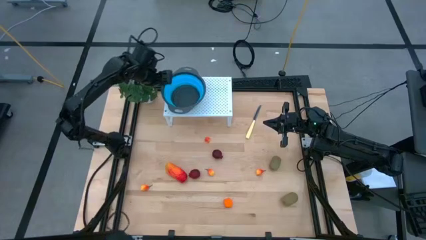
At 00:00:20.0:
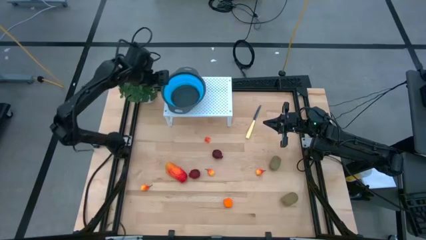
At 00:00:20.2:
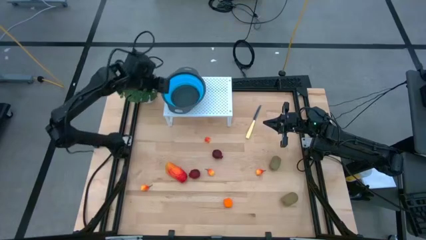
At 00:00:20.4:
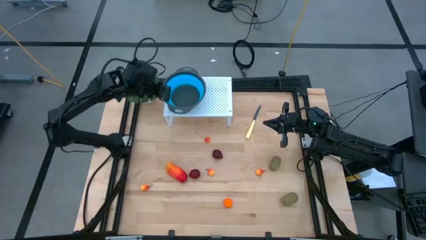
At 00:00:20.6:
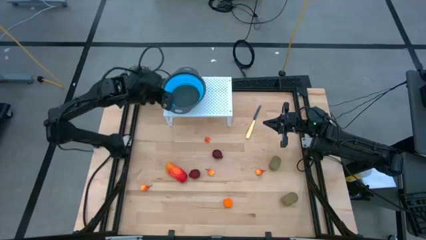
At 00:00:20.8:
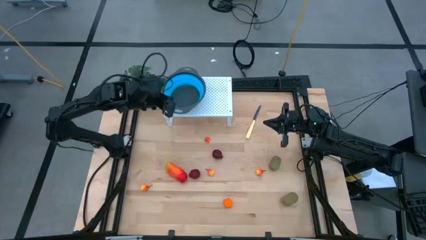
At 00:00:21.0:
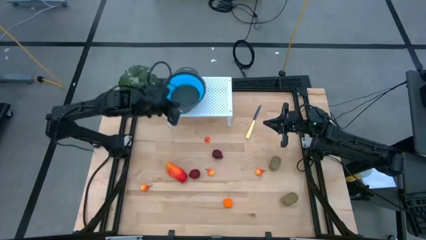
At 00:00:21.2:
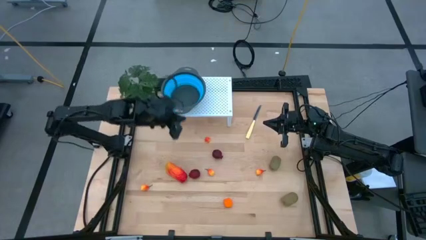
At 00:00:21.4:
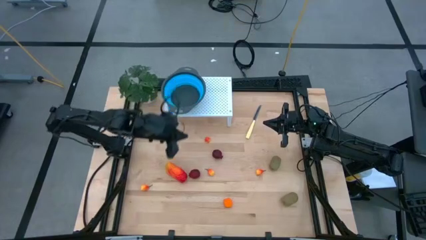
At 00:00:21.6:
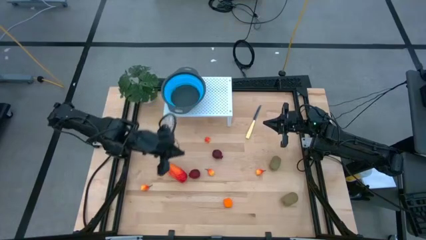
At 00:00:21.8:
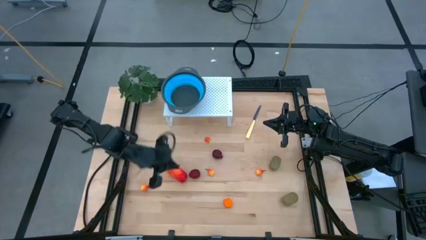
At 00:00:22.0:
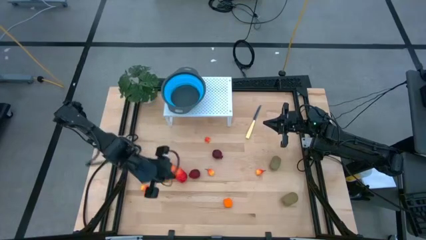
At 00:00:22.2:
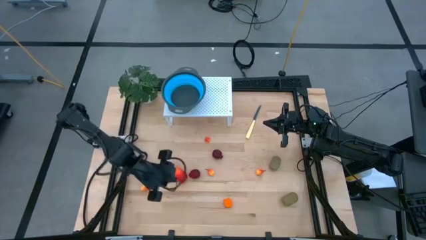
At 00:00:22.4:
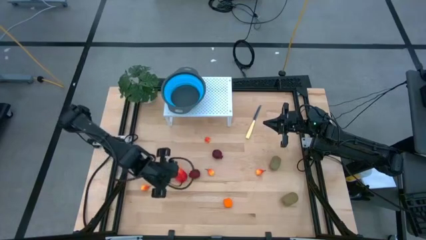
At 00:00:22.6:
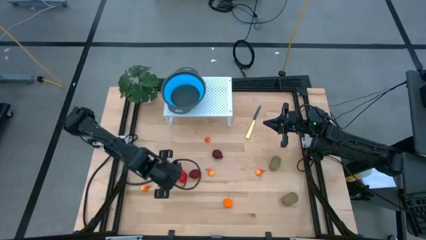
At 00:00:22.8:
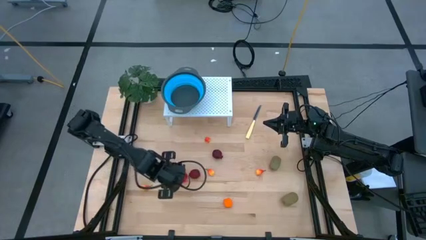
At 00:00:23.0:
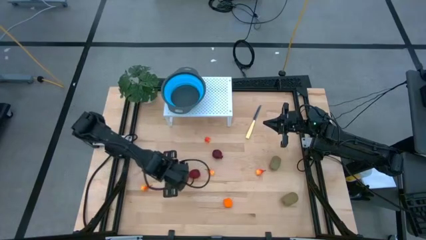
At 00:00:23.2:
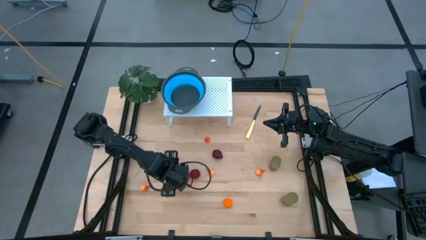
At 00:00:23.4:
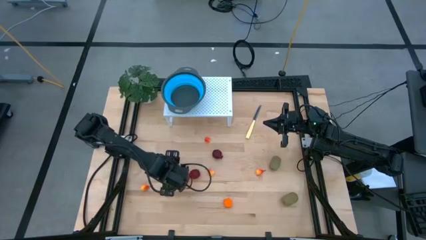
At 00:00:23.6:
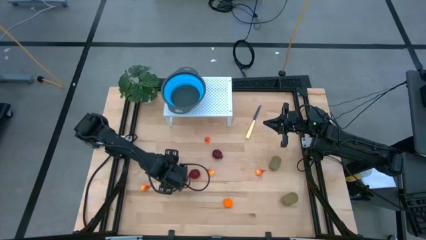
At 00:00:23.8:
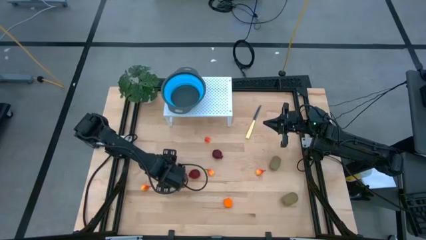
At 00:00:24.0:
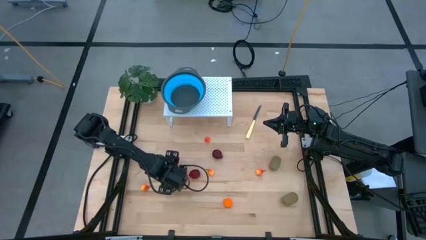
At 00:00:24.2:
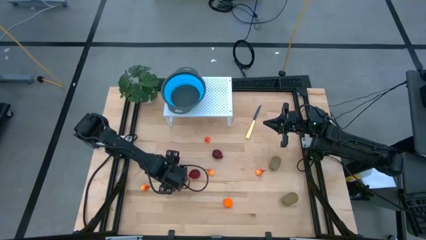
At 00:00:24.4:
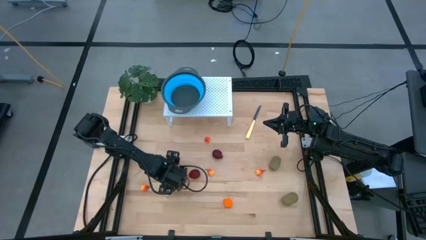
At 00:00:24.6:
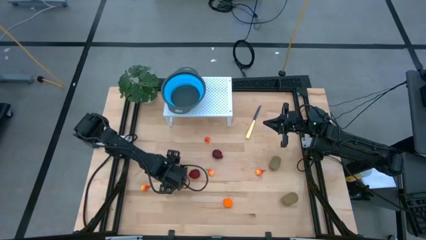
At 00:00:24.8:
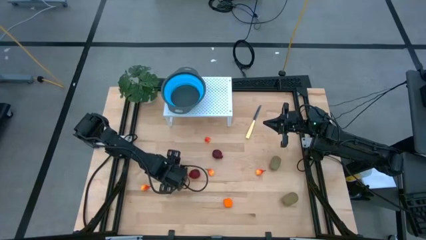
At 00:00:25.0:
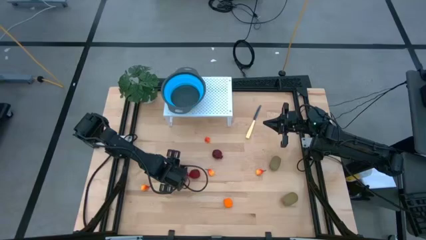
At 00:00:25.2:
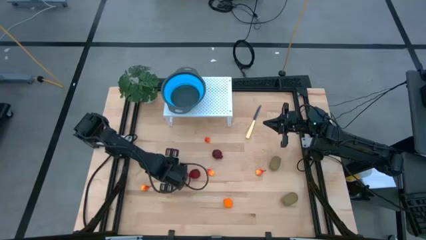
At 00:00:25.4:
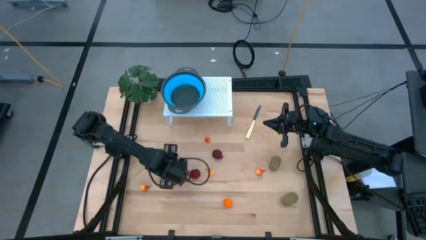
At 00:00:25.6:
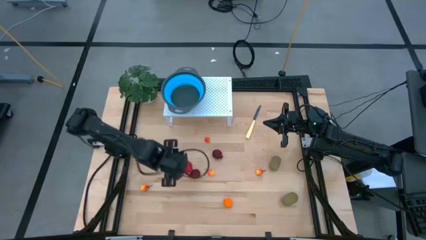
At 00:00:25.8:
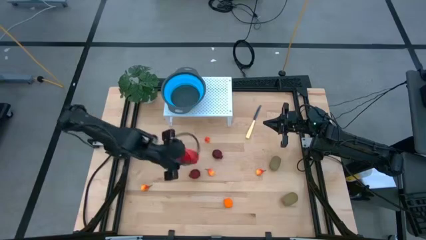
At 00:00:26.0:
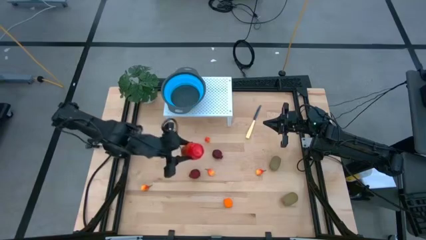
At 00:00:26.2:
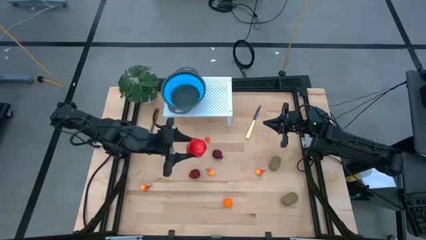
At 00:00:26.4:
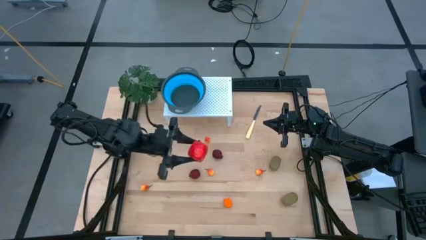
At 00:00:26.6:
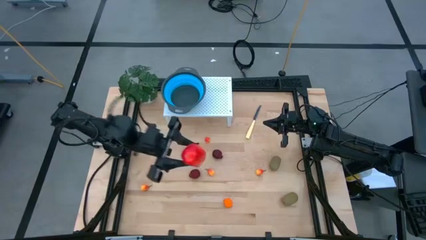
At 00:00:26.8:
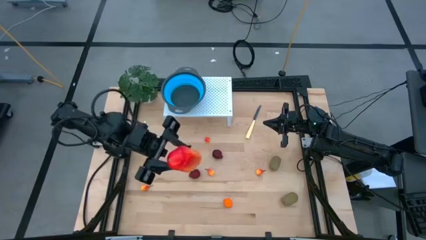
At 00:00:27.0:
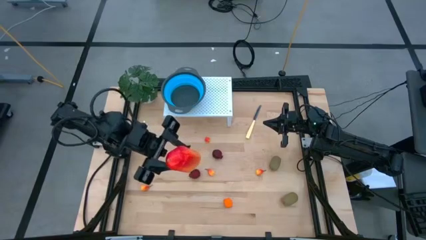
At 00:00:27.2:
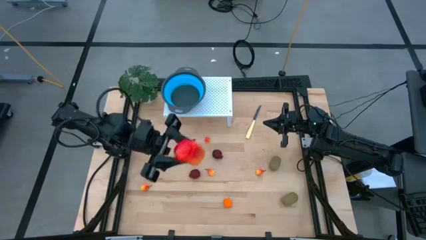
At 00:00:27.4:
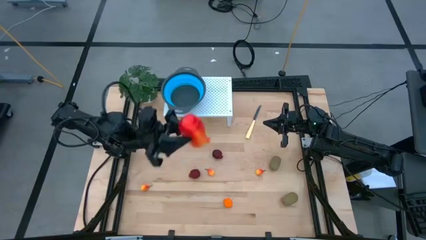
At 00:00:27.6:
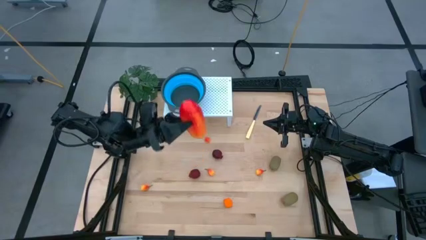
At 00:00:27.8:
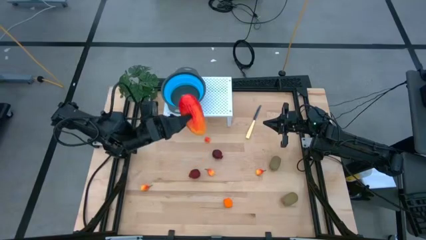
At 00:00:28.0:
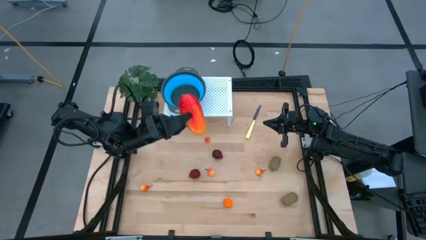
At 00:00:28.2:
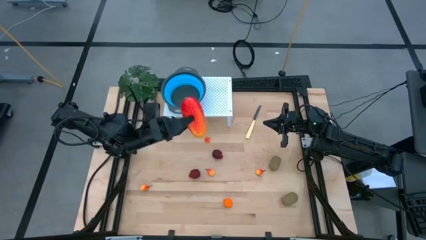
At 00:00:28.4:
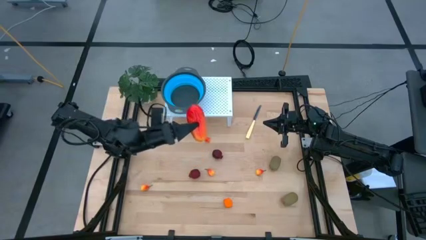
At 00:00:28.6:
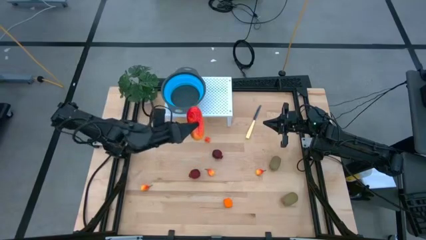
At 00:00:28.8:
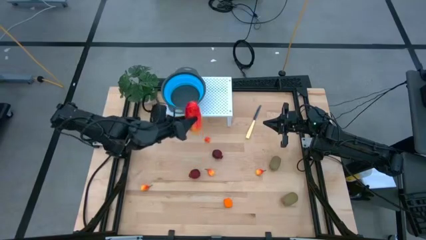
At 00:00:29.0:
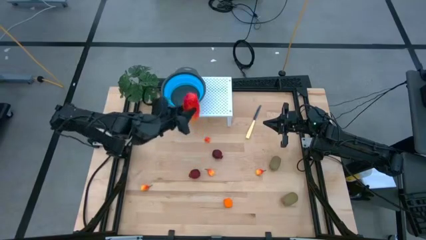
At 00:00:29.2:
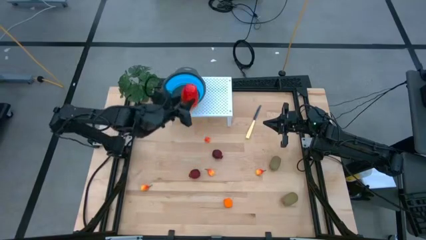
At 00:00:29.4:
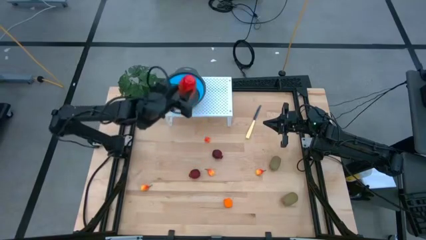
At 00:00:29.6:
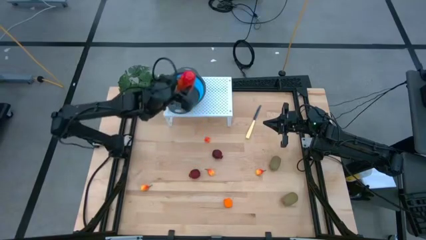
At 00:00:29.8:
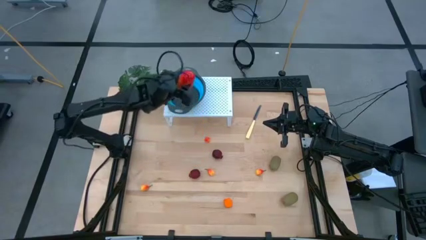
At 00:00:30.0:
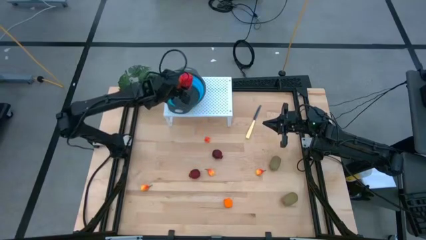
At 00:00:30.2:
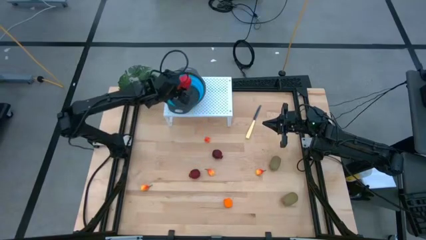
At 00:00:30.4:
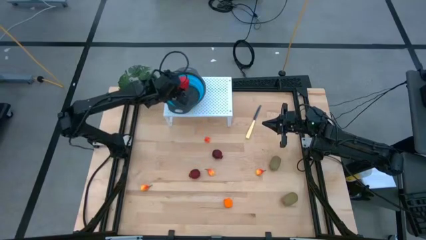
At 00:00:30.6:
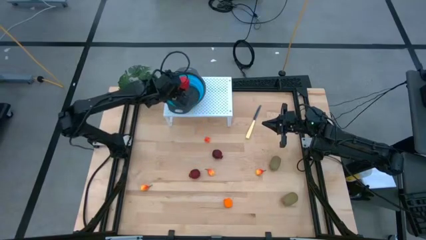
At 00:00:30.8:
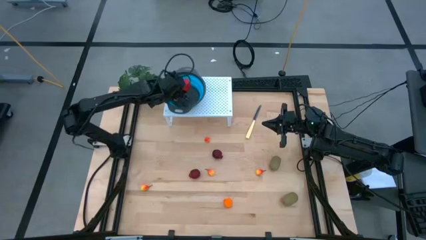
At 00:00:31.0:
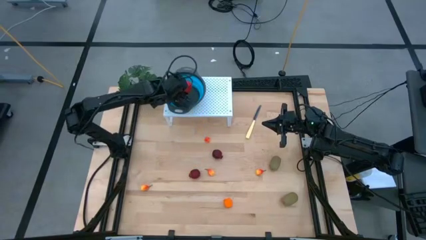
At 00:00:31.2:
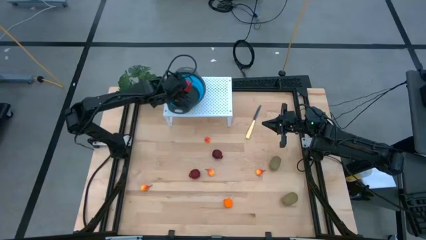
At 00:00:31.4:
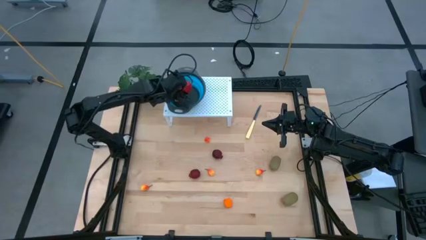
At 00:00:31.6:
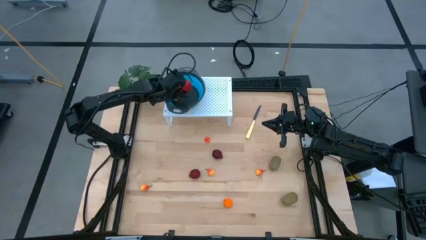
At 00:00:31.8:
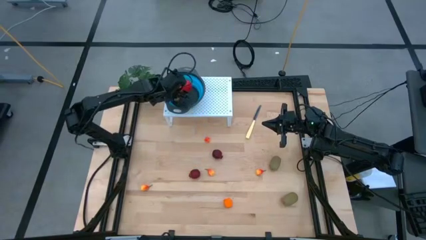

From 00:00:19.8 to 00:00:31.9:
Task: Pick & Place Fruit
Put the mango into the strainer bowl on the shelf

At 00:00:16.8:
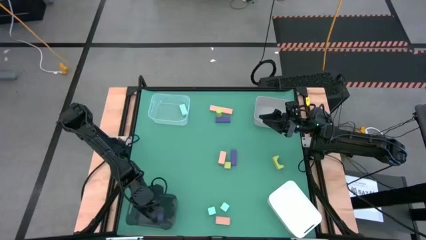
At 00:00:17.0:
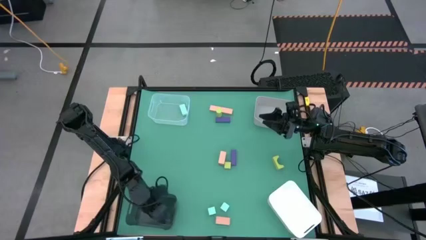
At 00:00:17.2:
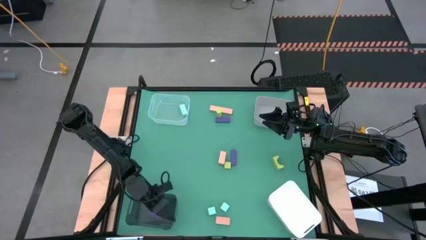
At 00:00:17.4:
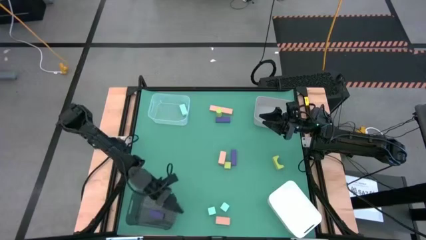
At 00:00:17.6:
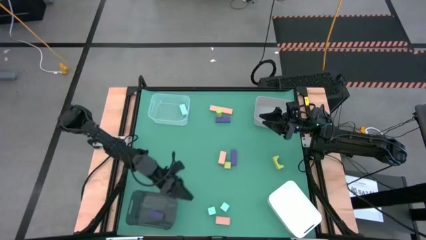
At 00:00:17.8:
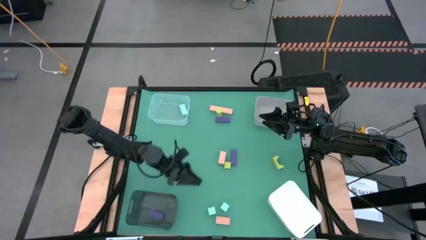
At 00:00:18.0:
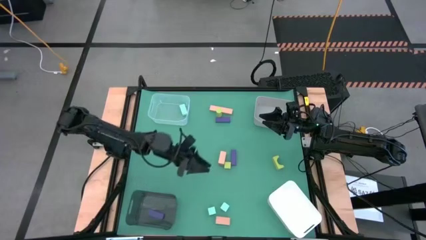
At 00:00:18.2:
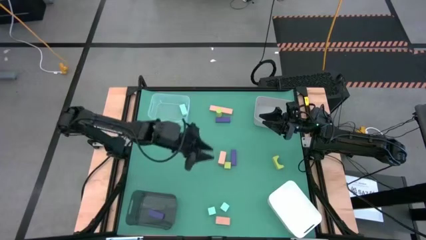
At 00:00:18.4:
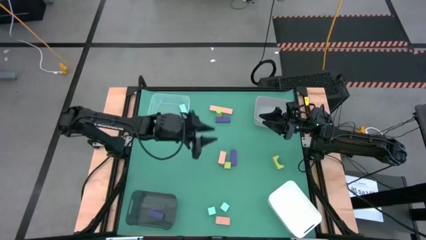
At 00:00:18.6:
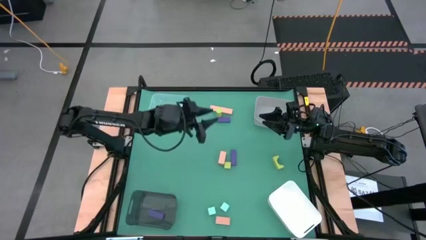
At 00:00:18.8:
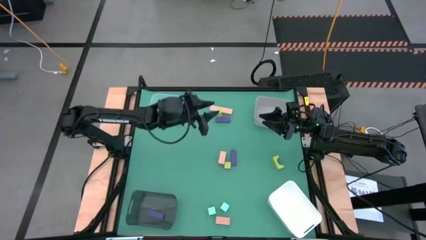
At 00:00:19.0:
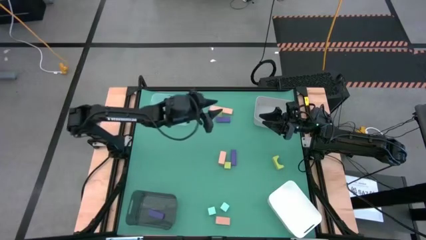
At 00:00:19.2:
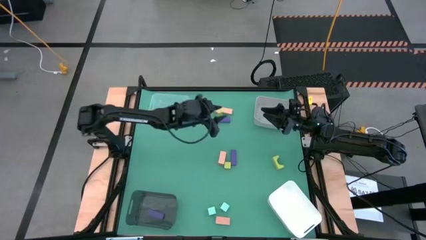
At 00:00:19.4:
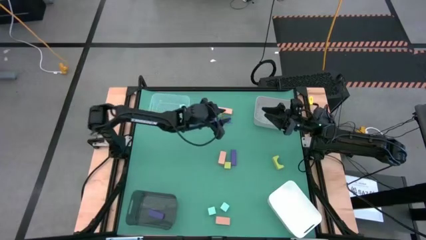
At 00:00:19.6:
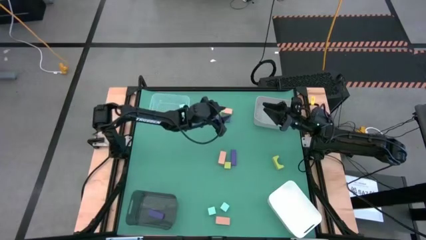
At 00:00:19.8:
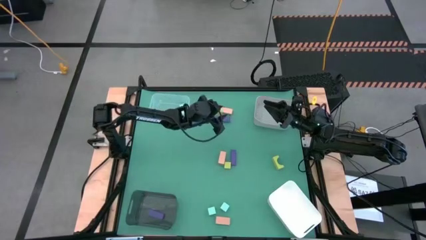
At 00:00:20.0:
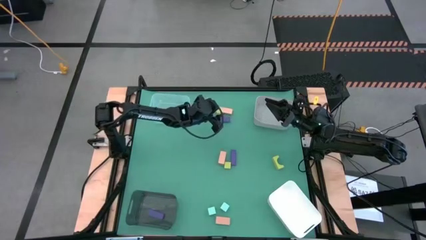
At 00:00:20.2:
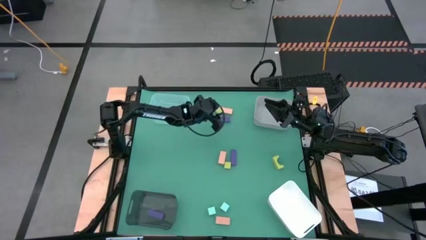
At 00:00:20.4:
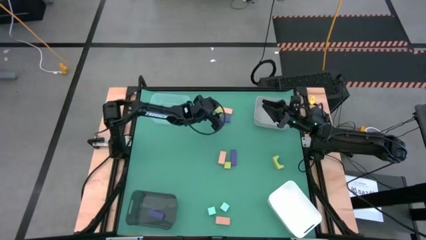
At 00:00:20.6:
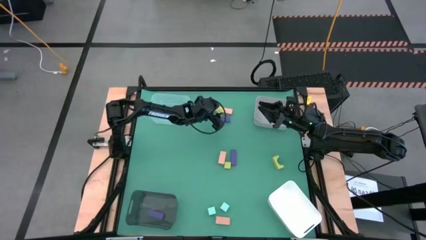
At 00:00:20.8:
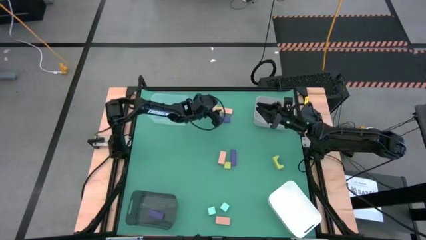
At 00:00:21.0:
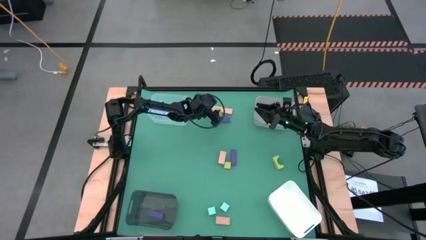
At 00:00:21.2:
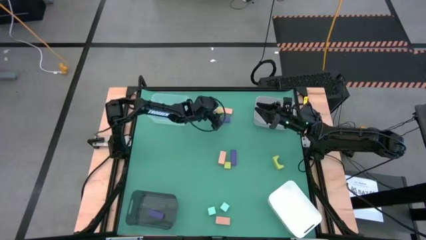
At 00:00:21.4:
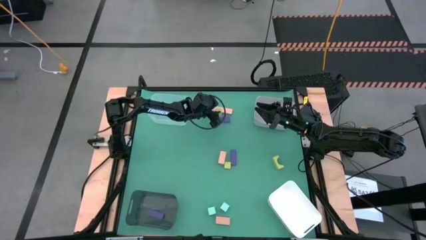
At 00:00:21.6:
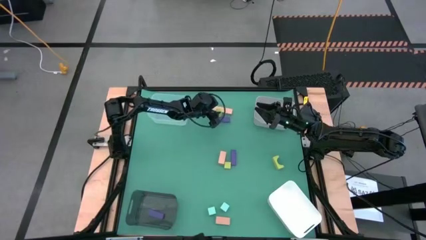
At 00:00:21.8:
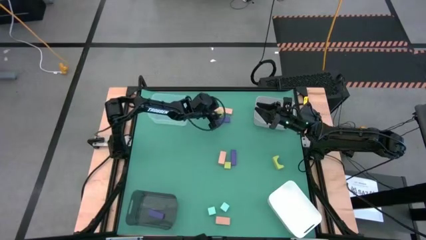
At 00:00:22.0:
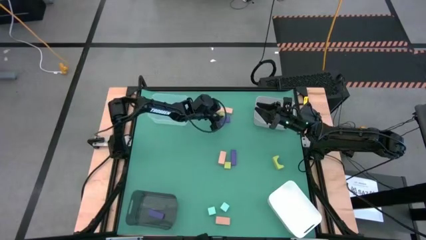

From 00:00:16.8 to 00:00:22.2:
Task: Sort & place blocks by color
Put the top light green block into the gray bin
